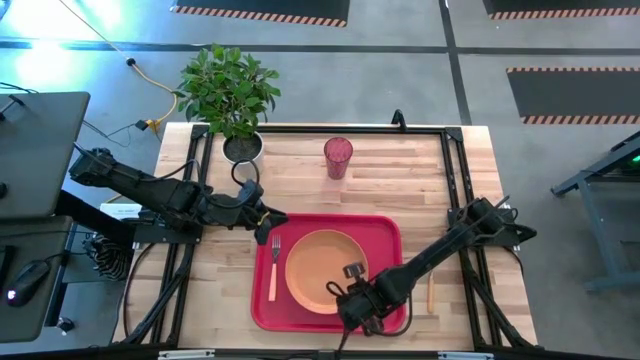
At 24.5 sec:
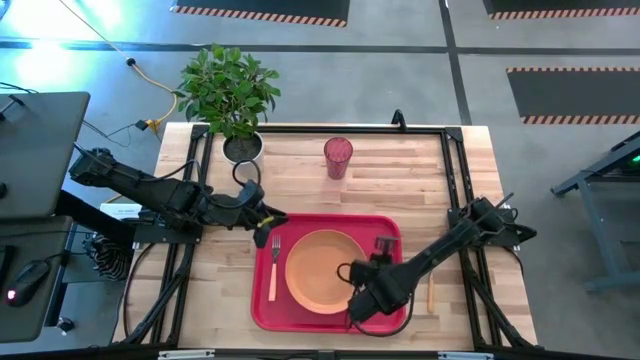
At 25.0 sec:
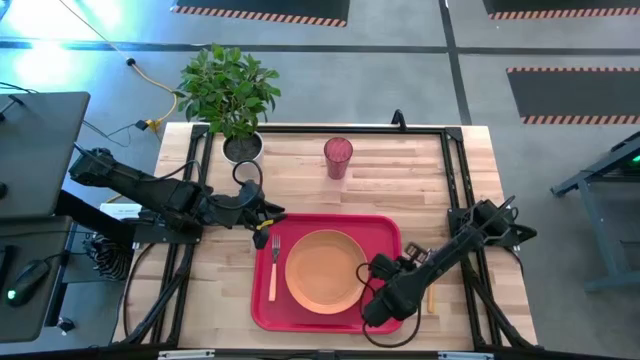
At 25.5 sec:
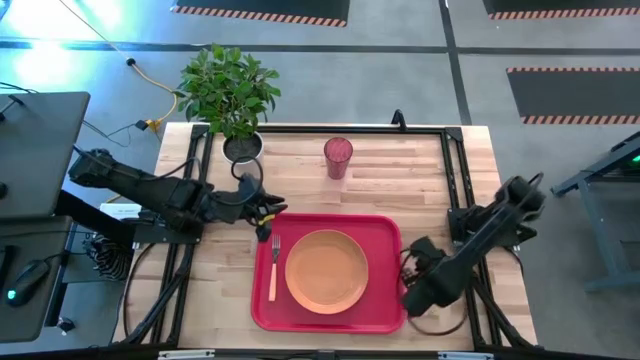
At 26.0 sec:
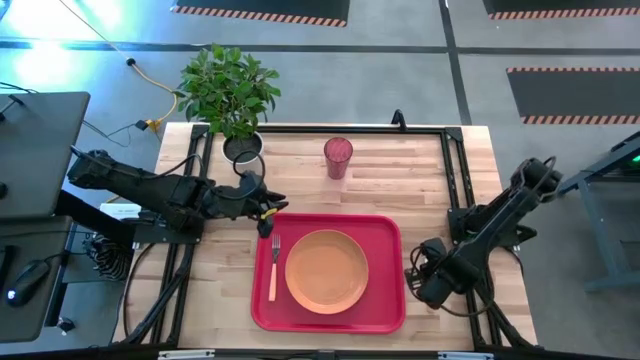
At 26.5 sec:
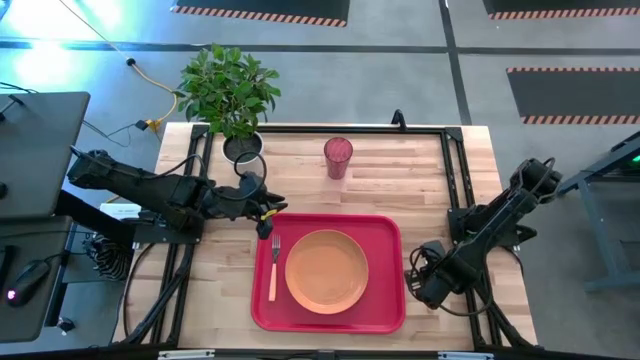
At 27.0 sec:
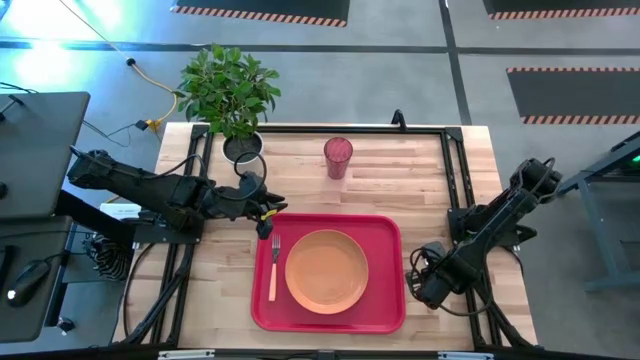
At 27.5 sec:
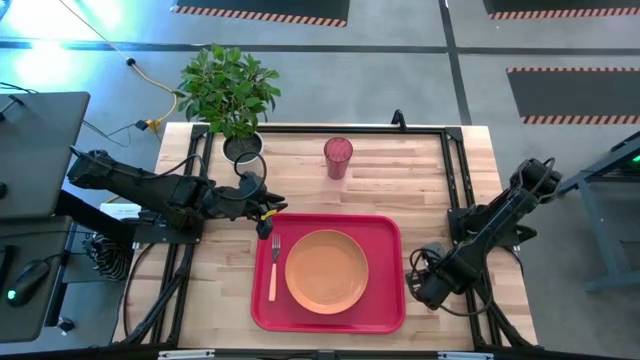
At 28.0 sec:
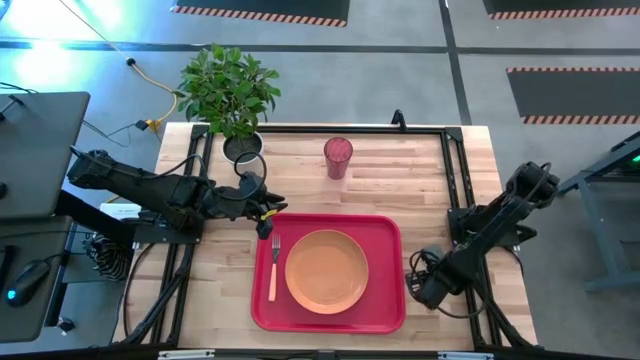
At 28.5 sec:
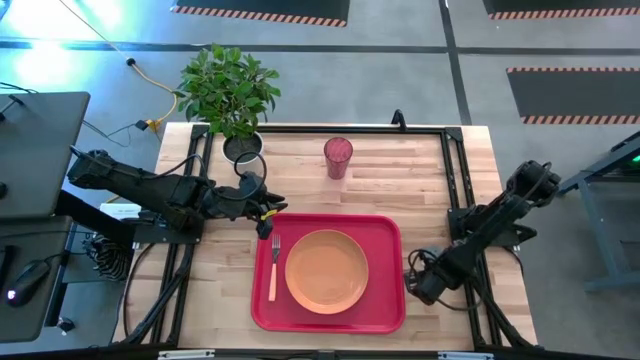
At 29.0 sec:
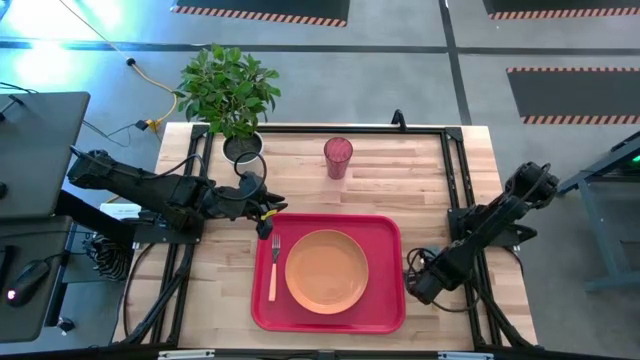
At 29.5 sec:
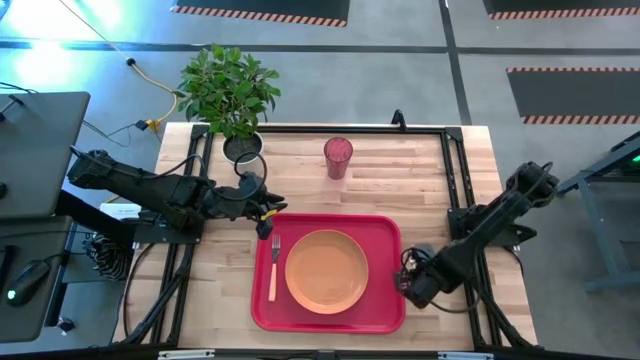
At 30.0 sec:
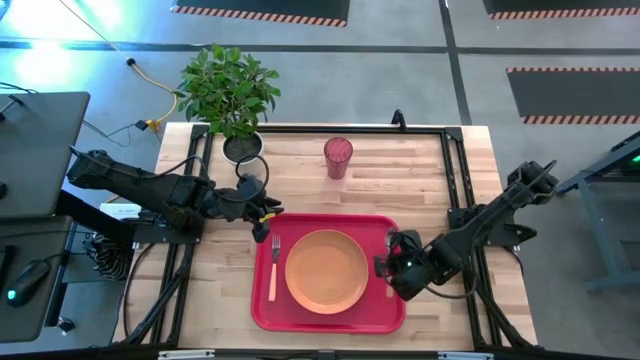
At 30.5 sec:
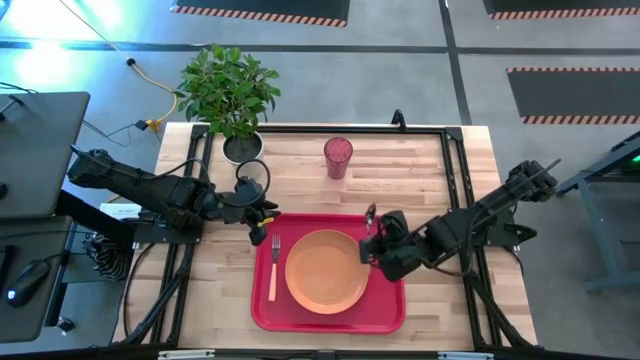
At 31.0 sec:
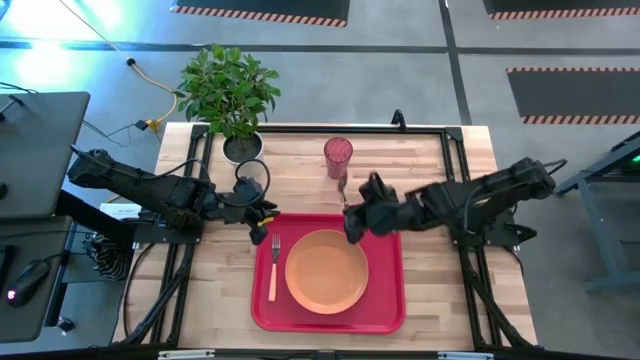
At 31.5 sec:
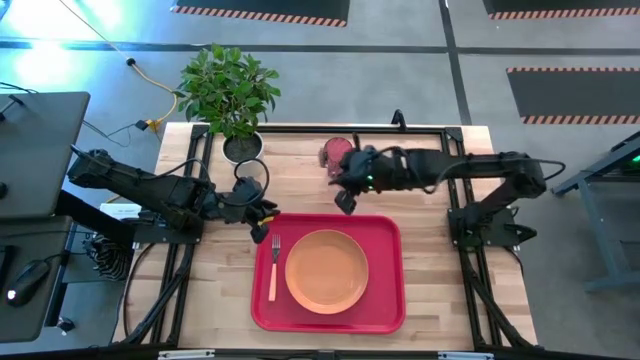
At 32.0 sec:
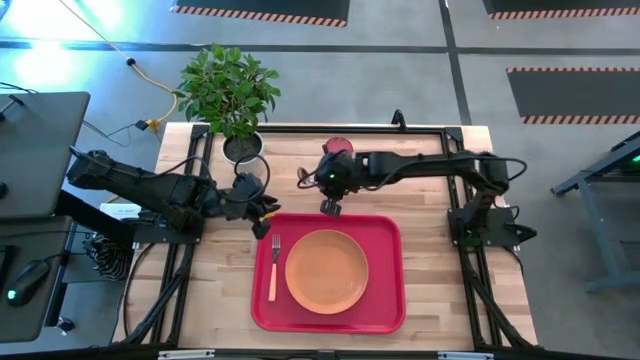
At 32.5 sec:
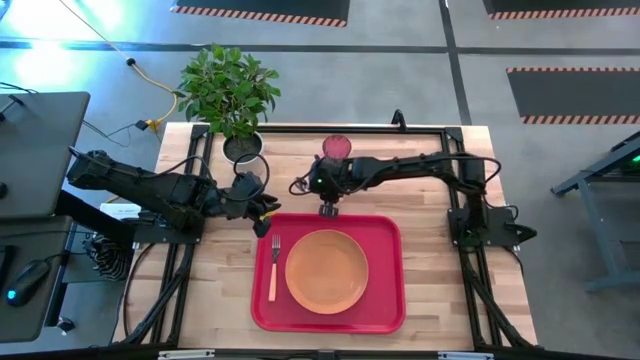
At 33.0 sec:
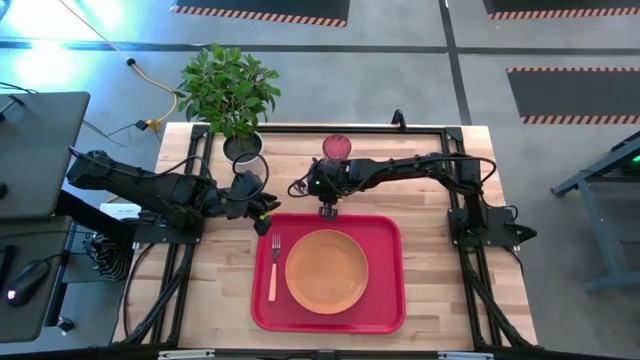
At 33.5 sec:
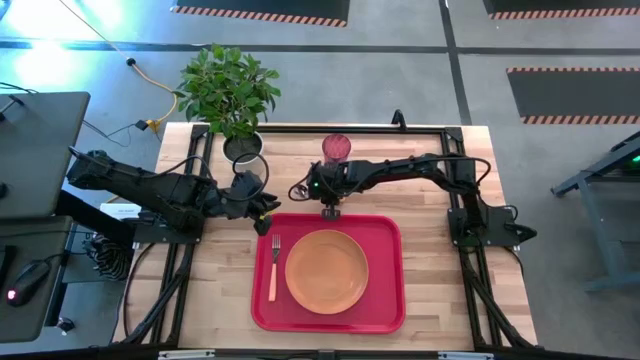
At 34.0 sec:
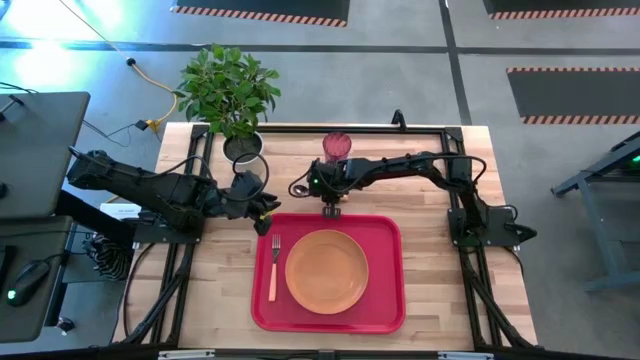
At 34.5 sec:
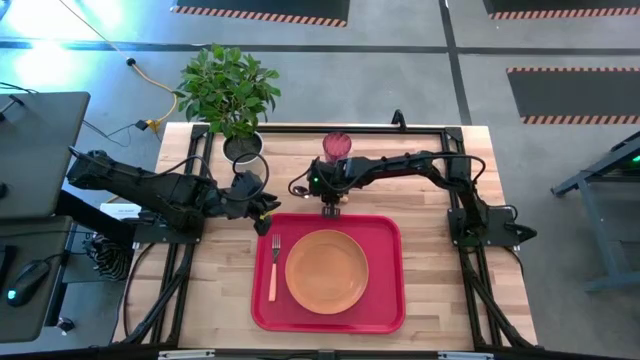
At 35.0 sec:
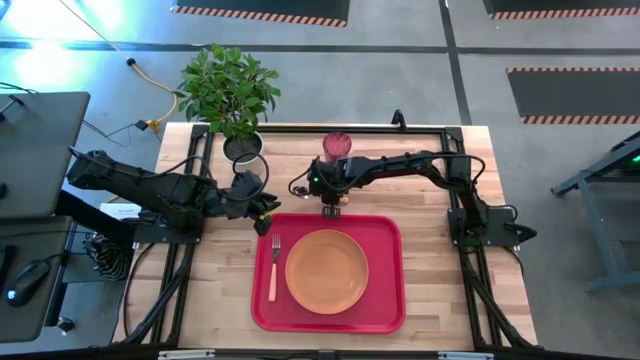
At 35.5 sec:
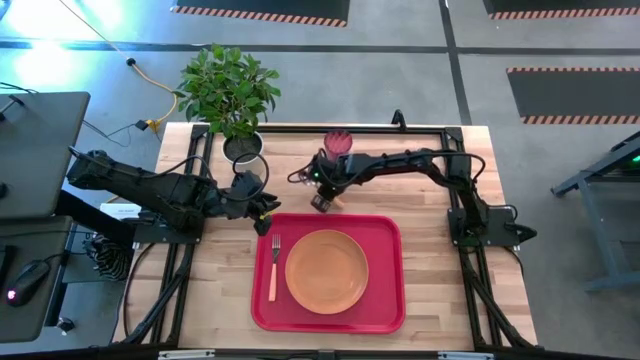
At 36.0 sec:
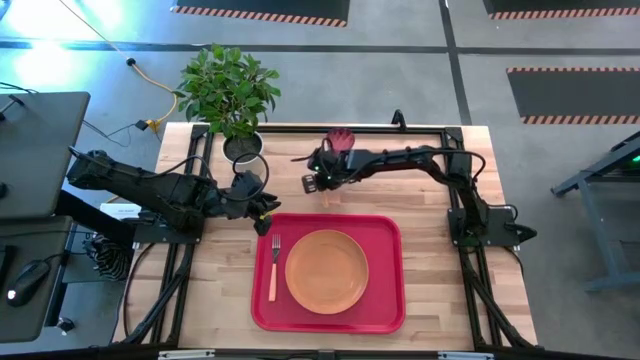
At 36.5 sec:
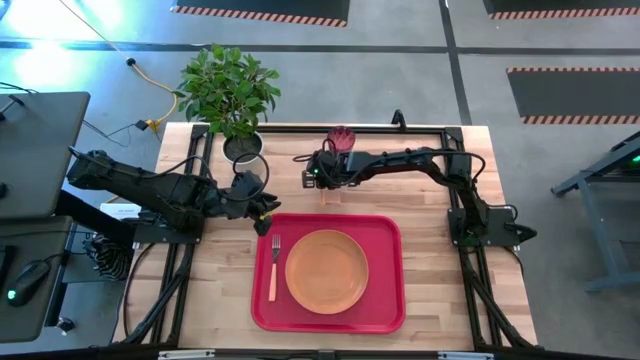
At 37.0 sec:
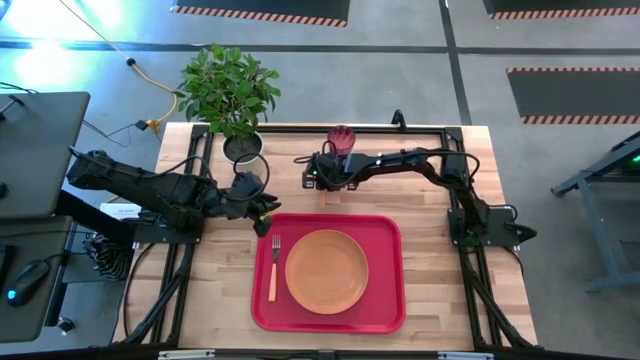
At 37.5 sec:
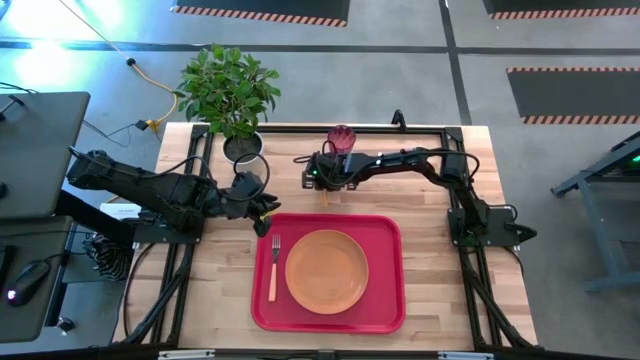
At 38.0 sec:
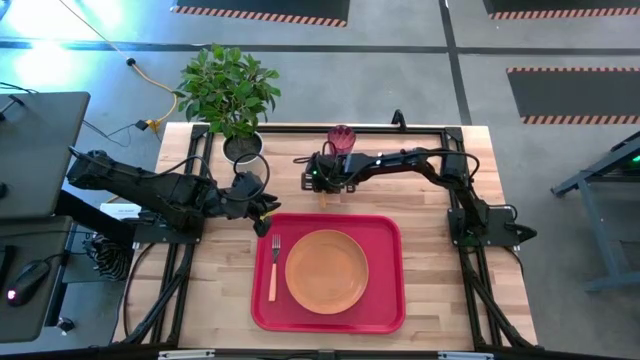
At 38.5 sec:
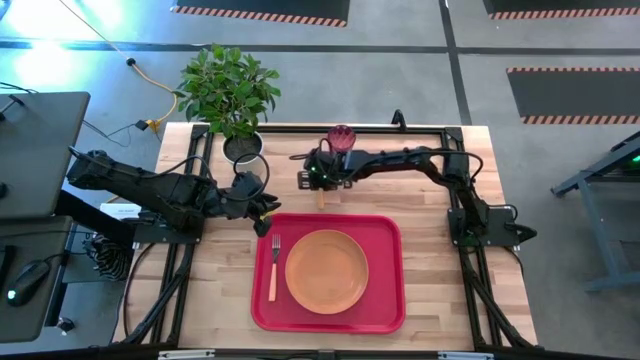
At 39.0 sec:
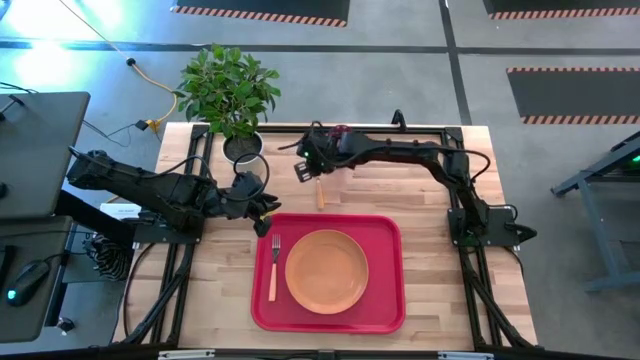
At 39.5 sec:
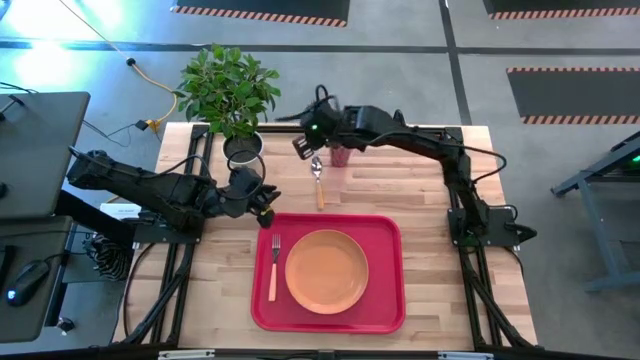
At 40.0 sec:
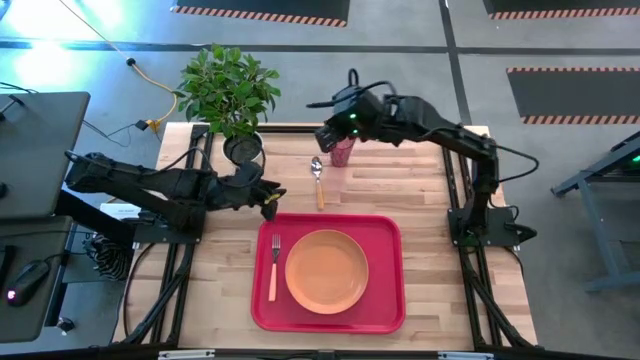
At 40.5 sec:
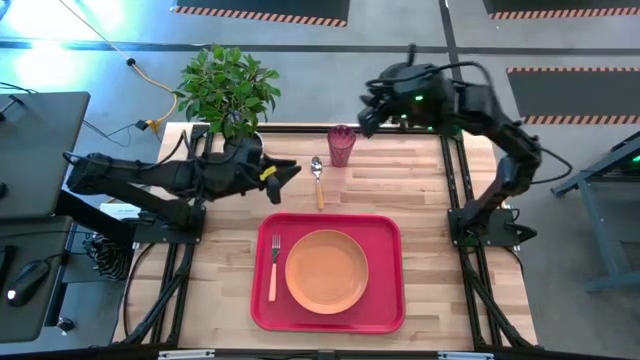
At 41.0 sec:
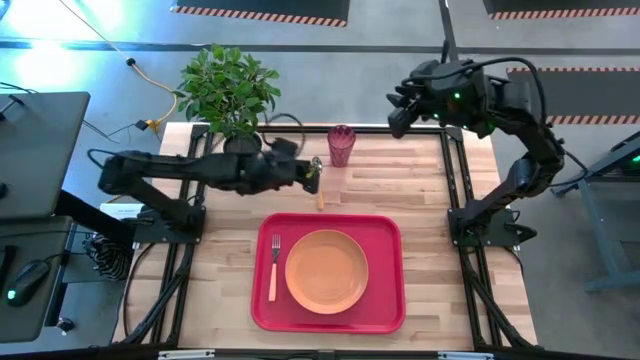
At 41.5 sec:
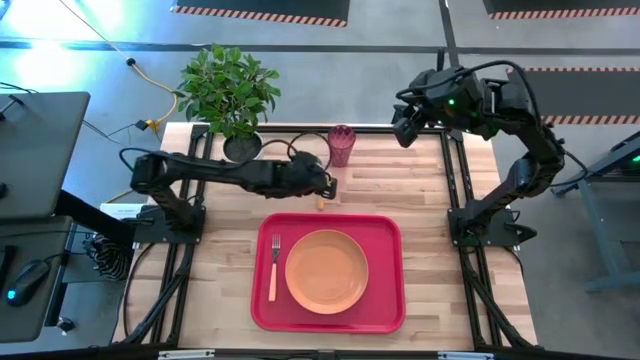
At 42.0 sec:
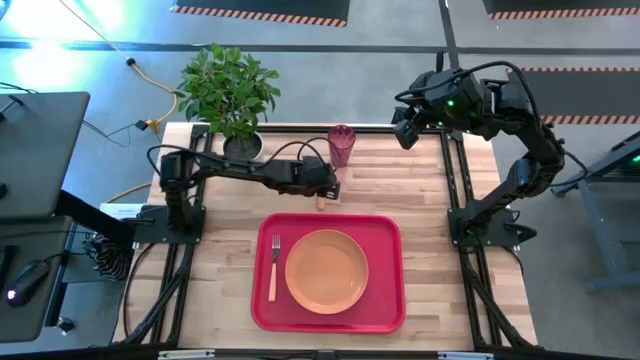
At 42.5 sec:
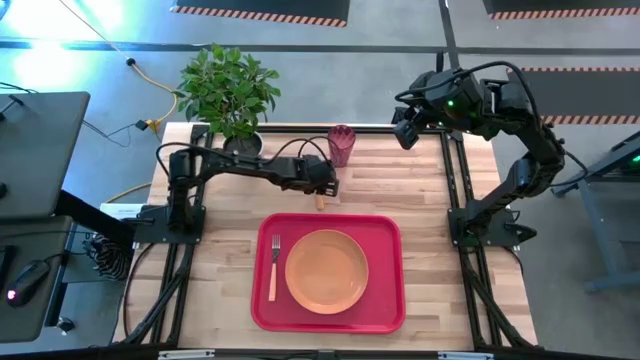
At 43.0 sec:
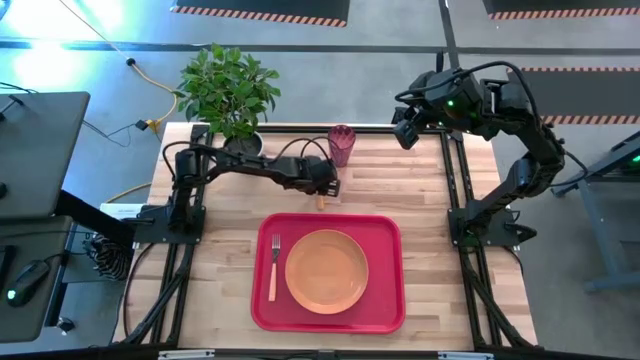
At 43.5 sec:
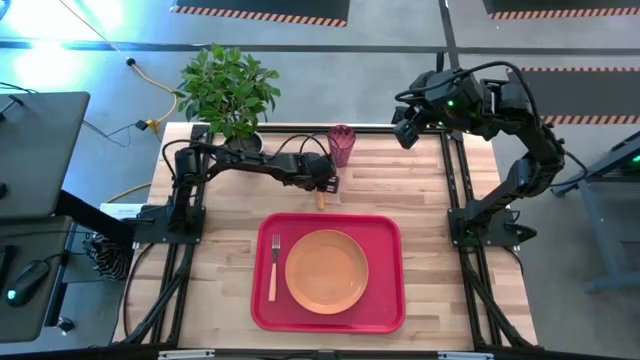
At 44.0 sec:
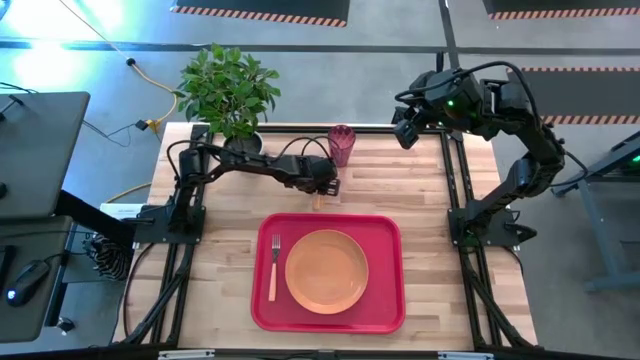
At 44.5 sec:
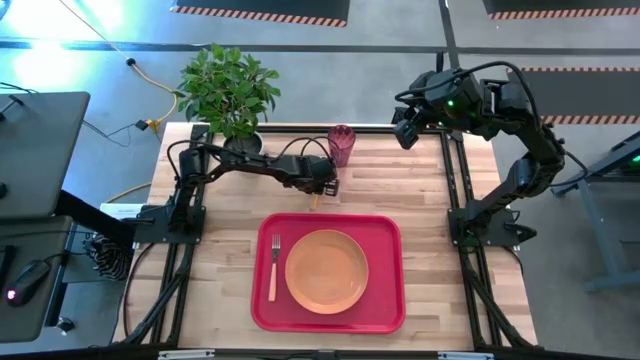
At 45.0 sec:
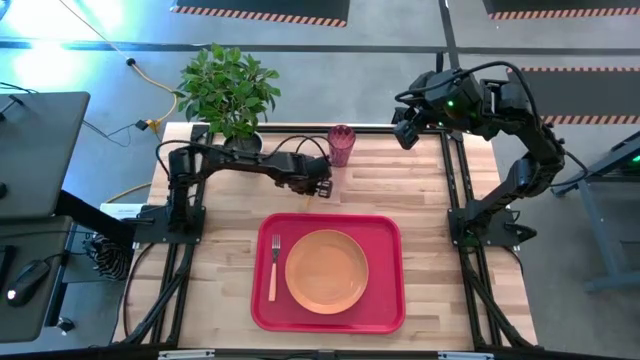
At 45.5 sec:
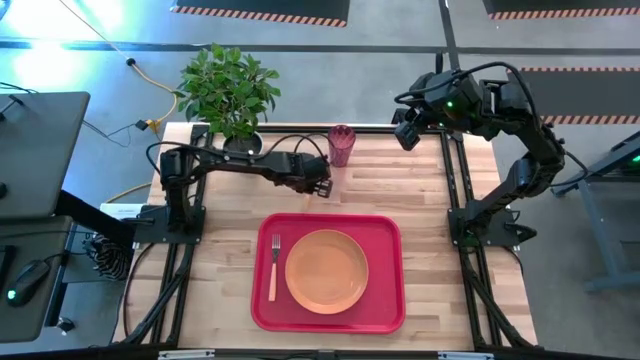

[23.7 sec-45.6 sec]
Task: Pick and place plate/cup/fork/spoon on tray
Put the yellow spoon on the red serving tray between the orange fork and the orange plate
